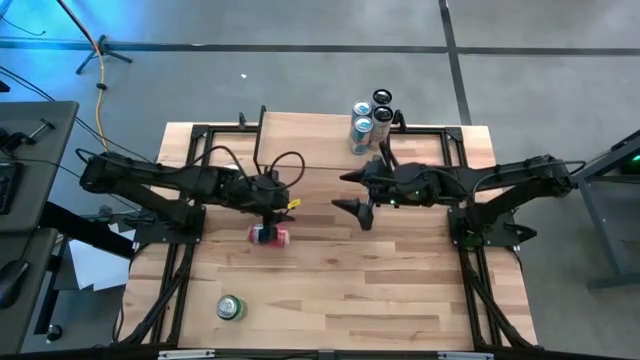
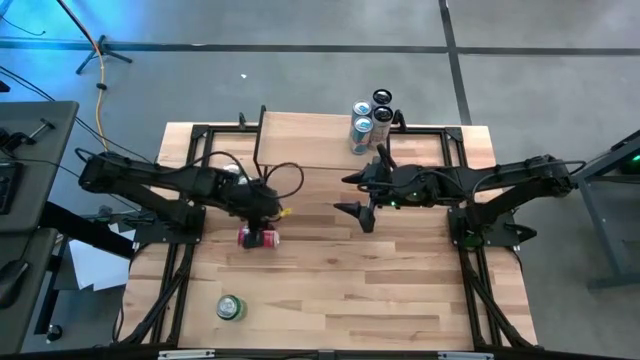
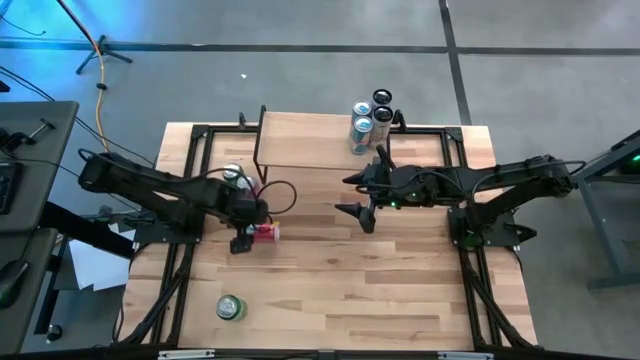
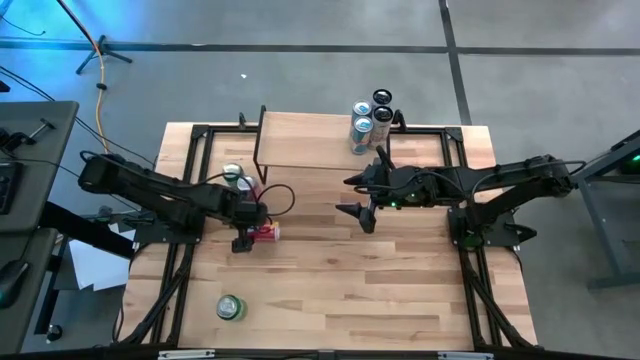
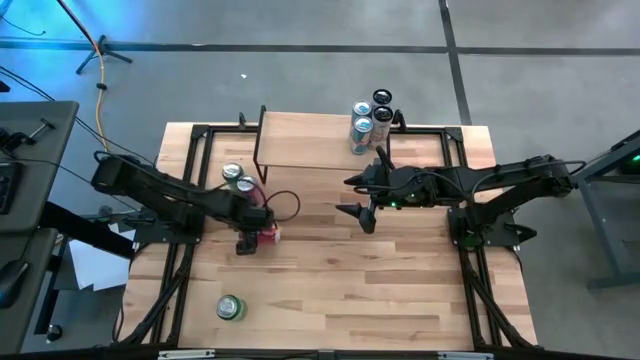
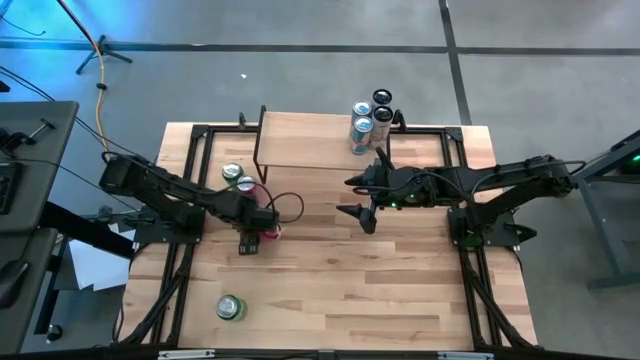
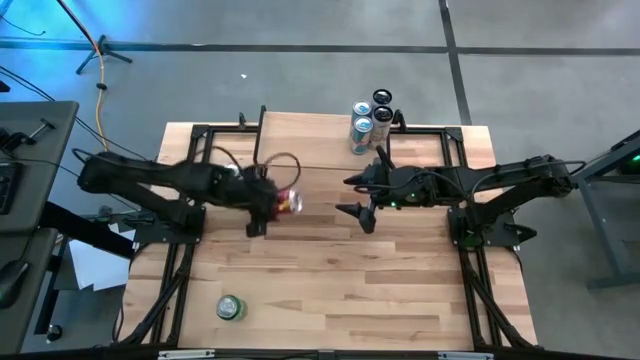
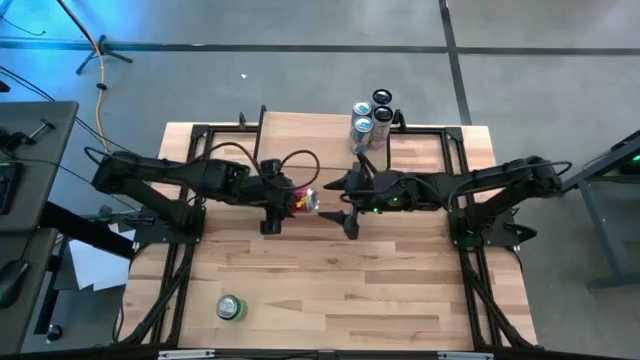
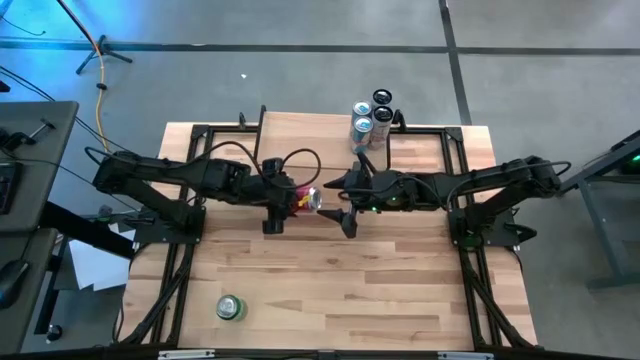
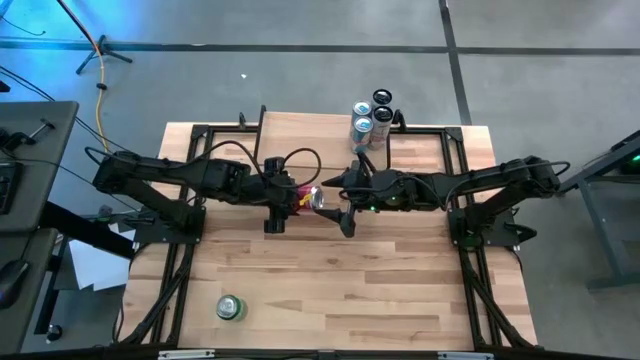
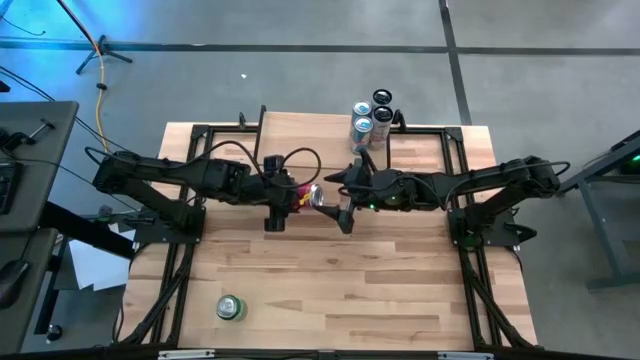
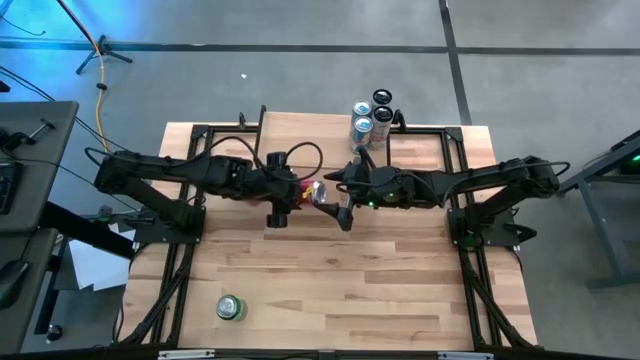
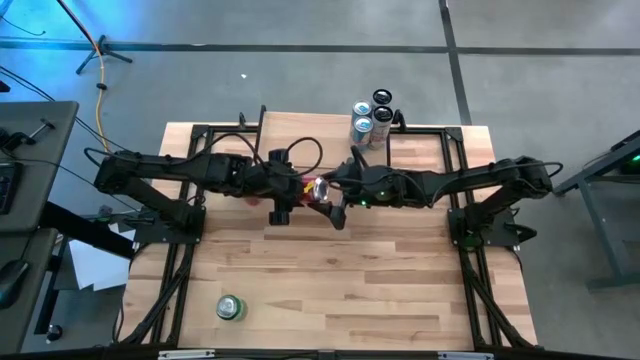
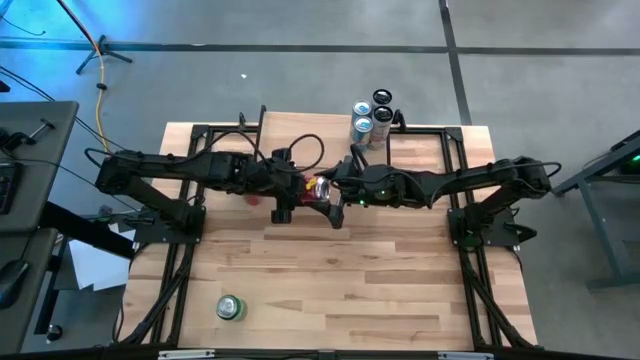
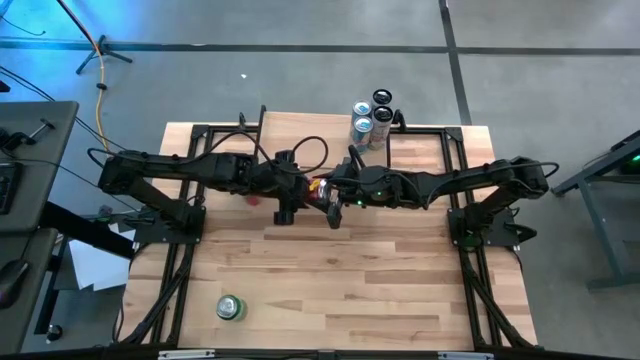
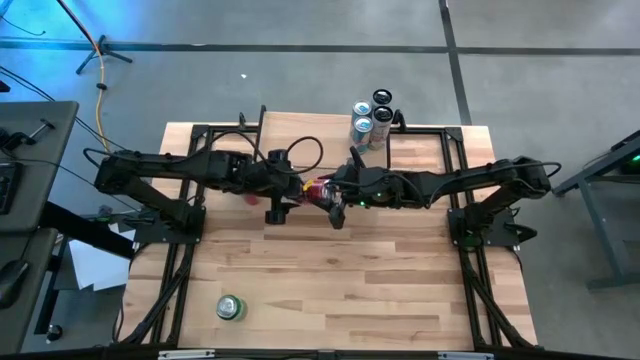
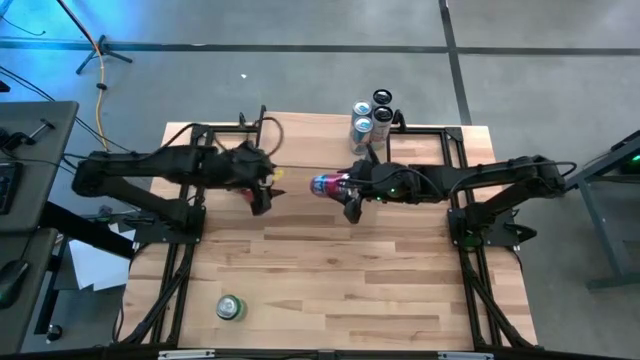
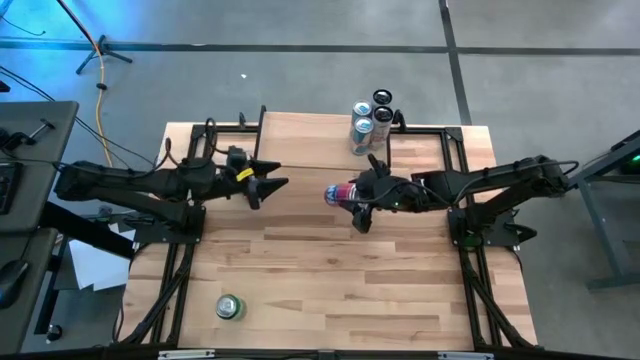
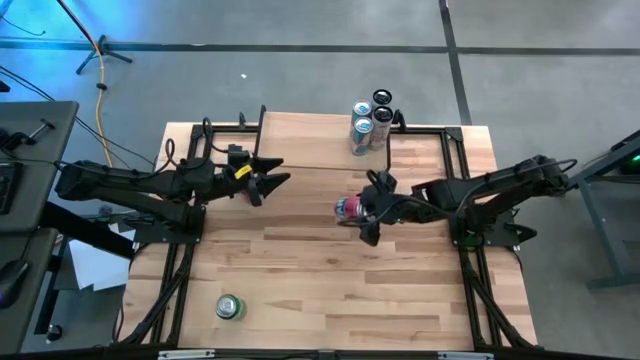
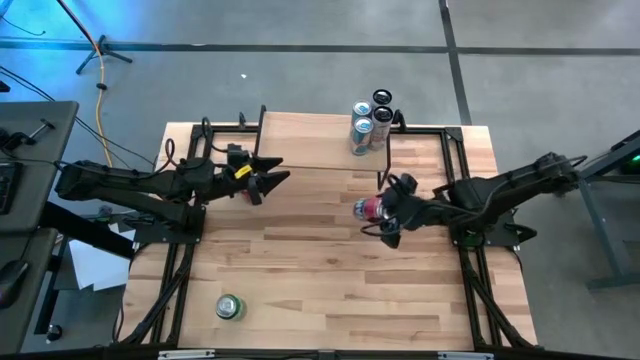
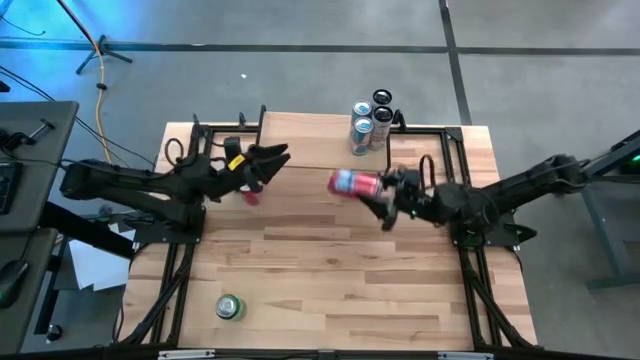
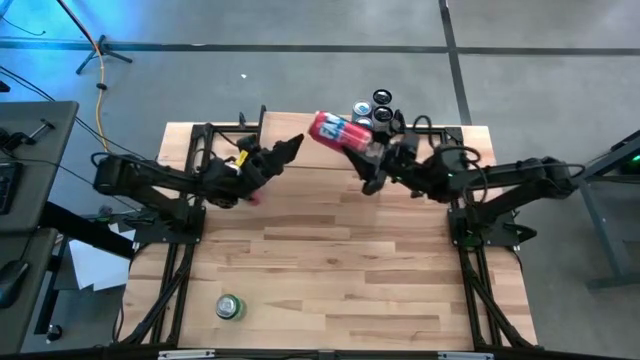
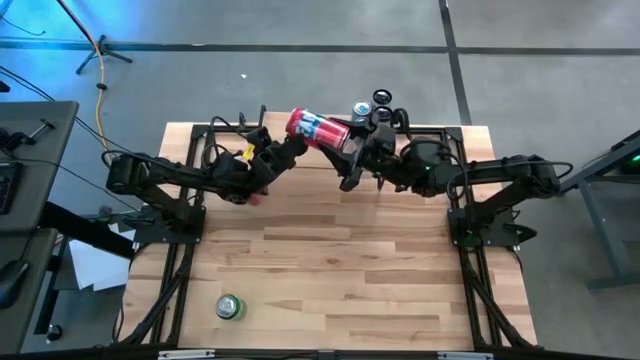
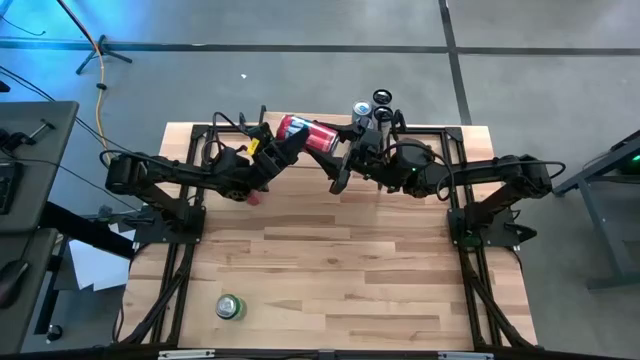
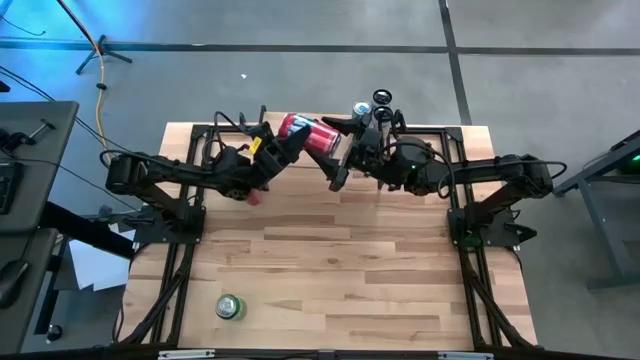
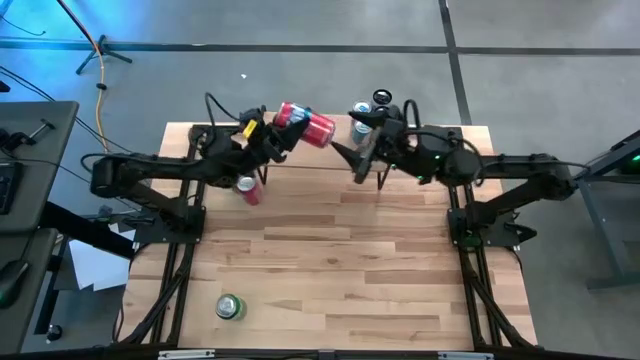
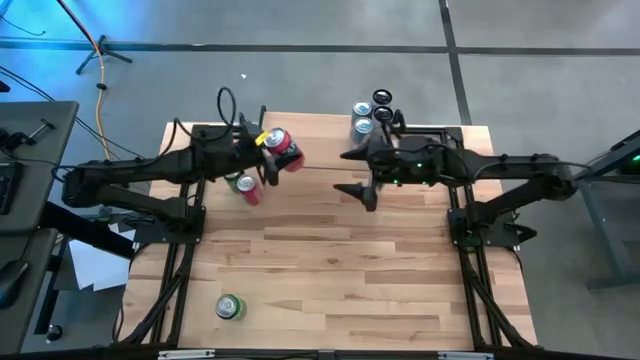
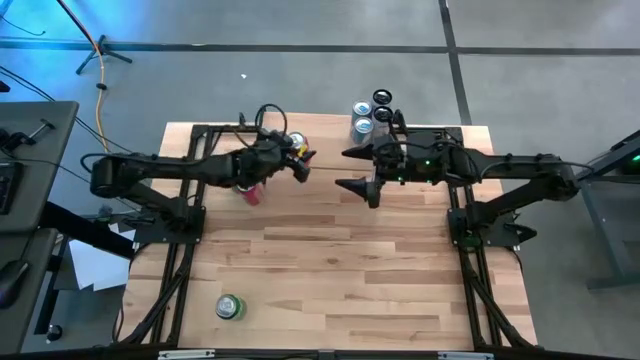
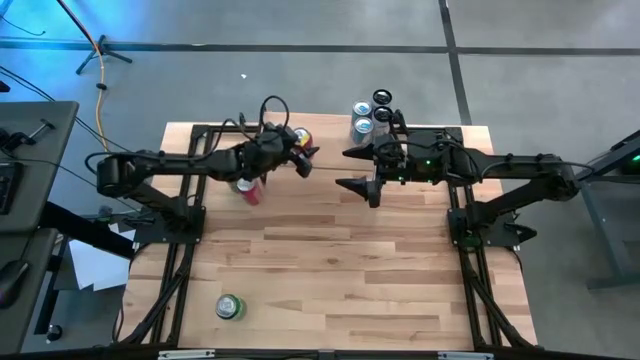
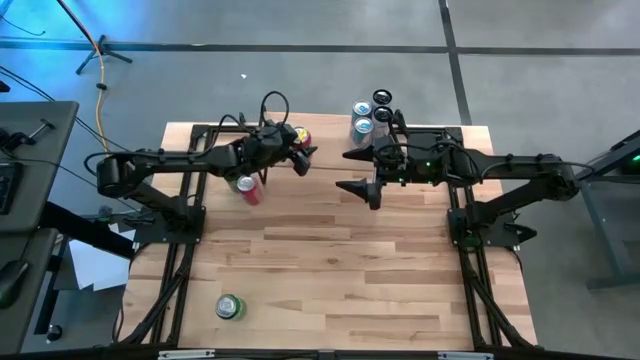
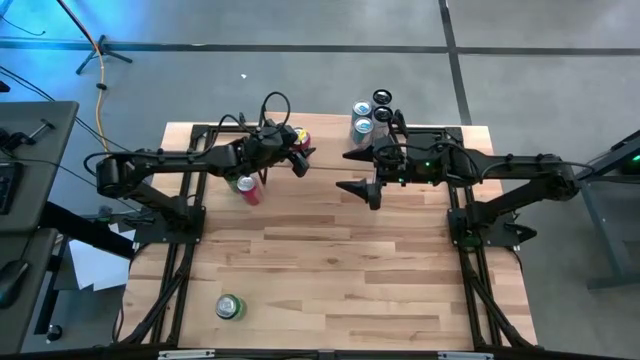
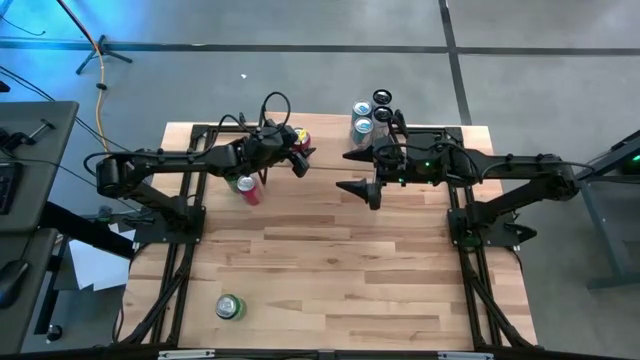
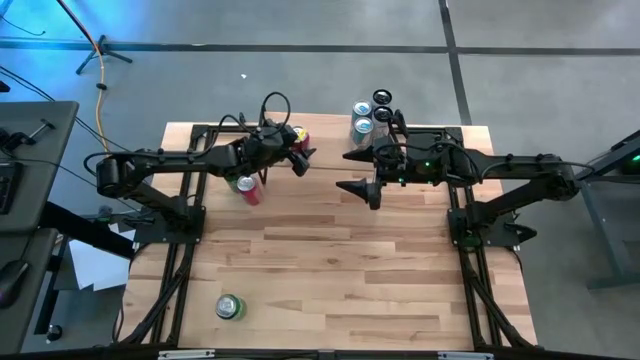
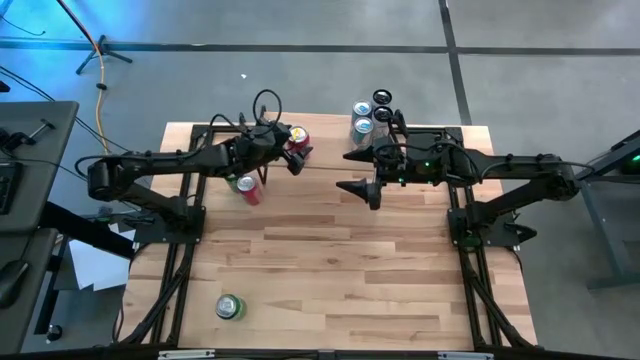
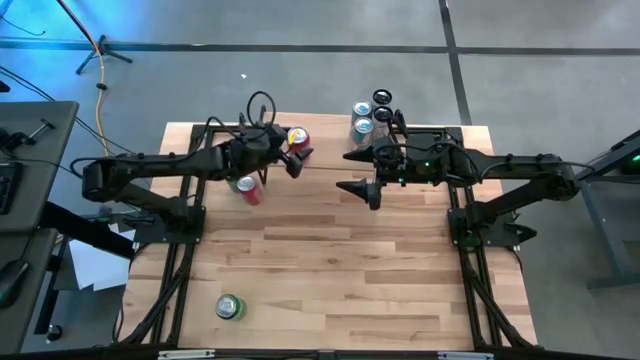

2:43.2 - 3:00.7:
Task: Place canned beverage on shelf
Put the bottom red soda can on the shelf
